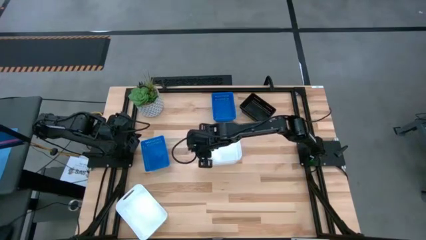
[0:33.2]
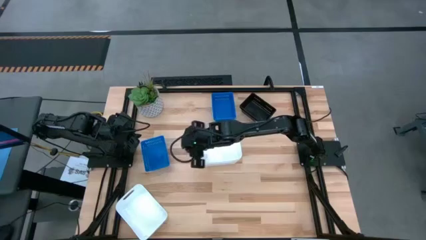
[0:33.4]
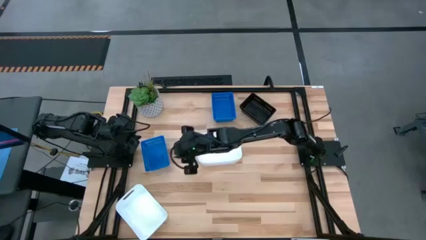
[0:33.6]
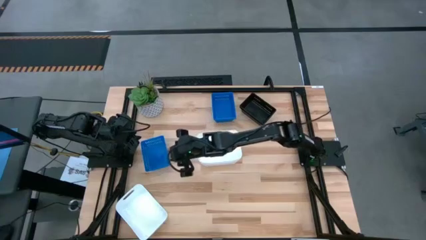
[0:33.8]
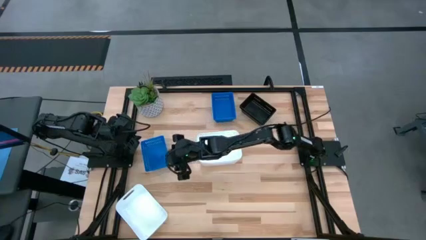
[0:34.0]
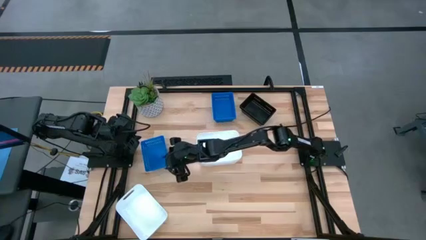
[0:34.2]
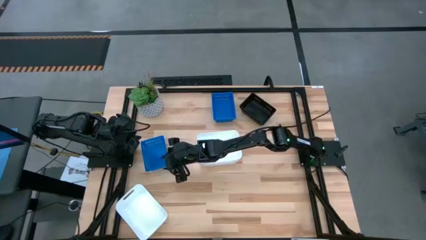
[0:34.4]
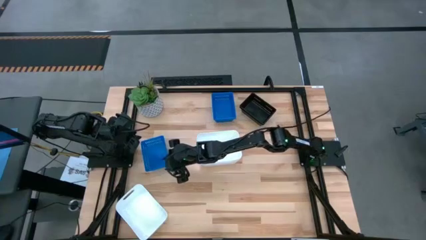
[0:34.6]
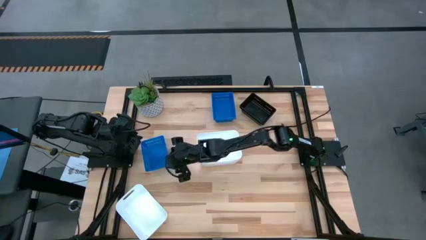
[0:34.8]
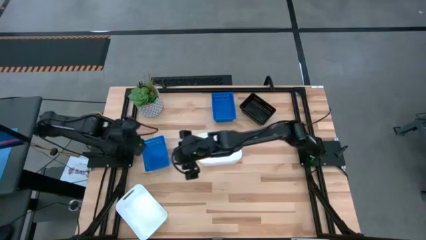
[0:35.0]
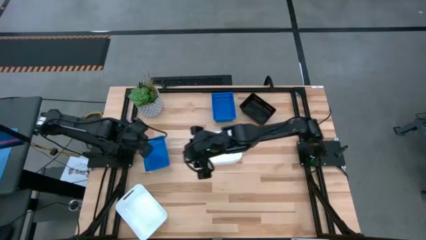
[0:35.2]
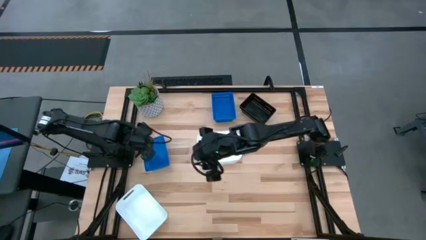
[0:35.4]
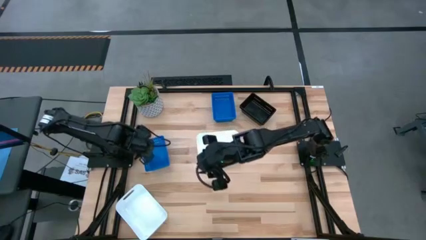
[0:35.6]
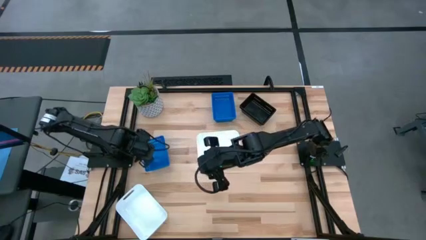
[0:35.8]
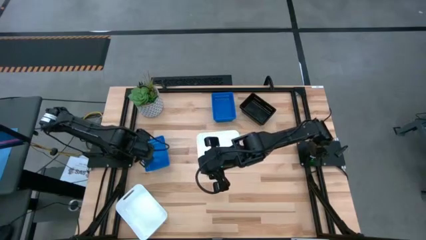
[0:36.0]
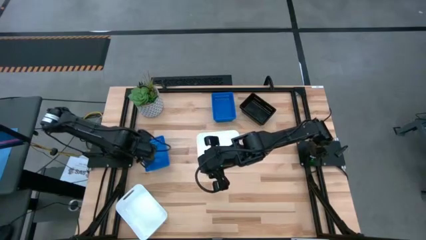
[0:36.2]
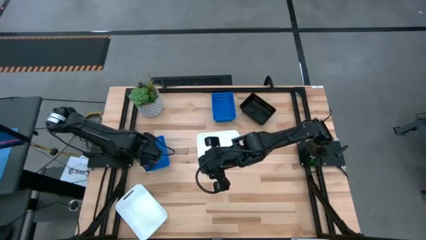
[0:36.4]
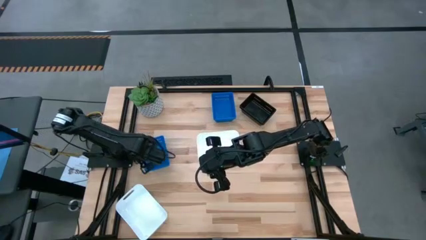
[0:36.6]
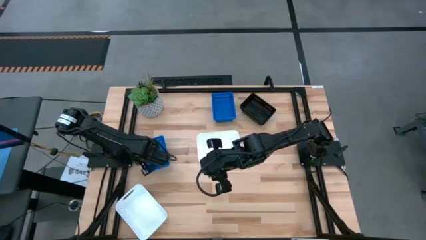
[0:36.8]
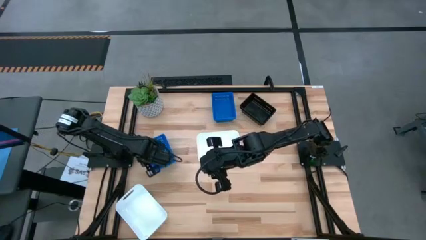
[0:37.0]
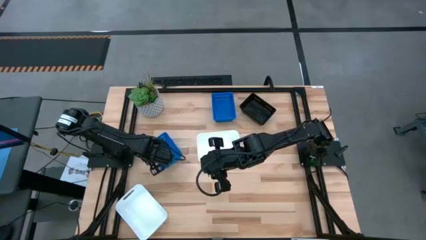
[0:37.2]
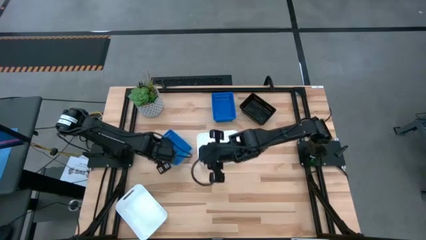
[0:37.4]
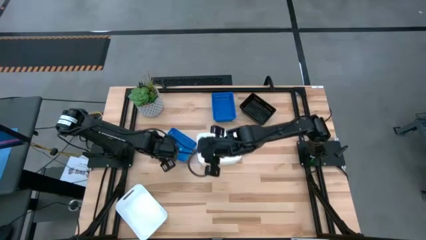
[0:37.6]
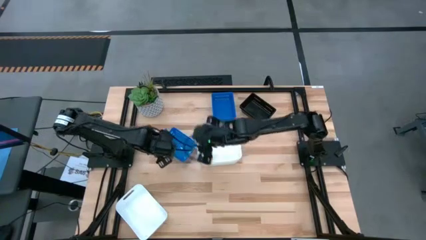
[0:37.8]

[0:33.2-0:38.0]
Move the blue bin toward the center of the table

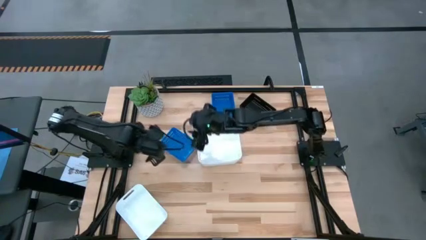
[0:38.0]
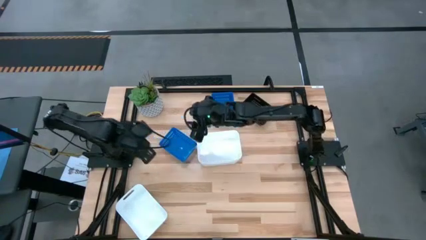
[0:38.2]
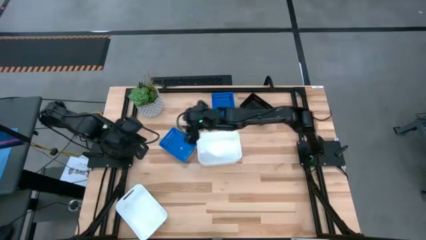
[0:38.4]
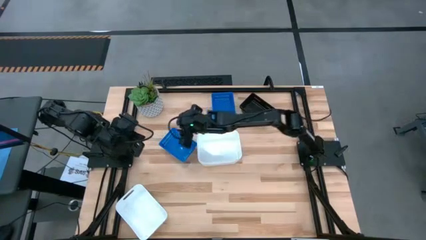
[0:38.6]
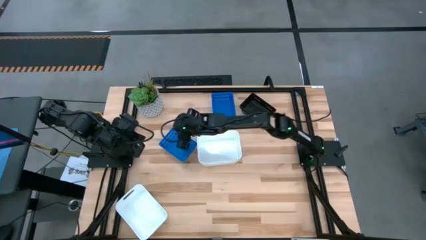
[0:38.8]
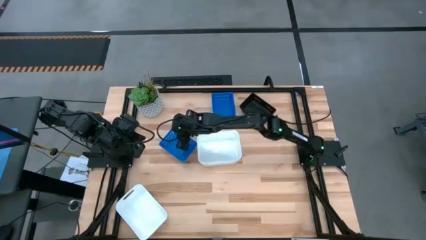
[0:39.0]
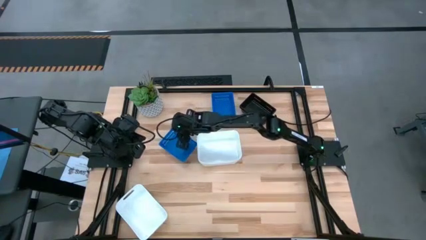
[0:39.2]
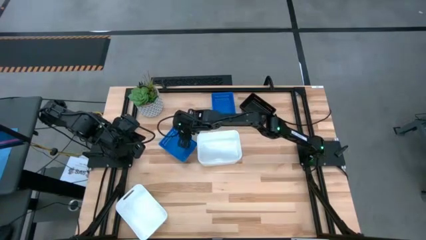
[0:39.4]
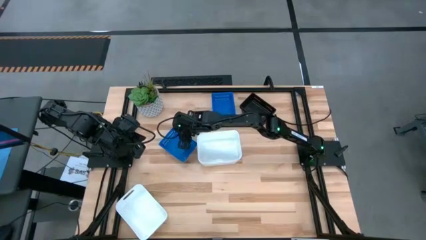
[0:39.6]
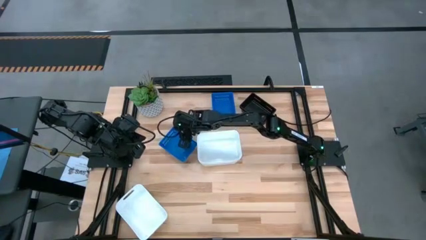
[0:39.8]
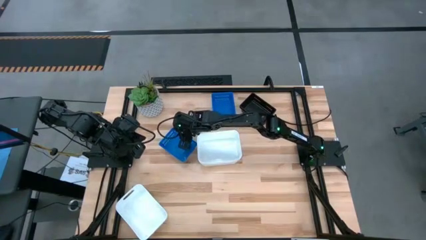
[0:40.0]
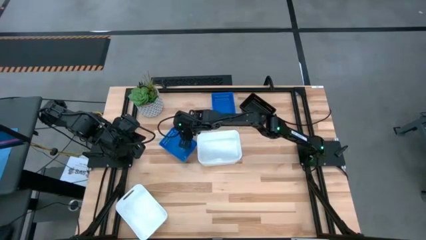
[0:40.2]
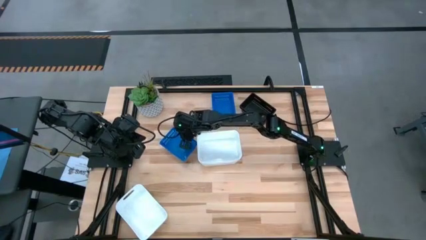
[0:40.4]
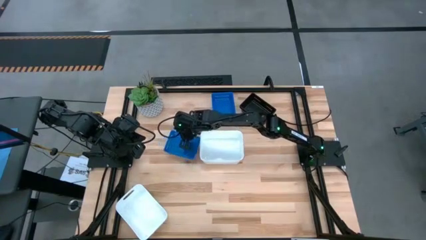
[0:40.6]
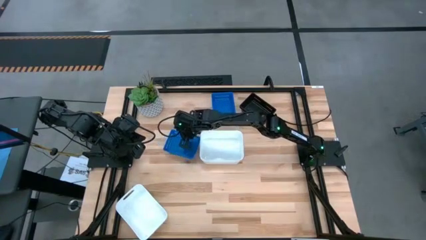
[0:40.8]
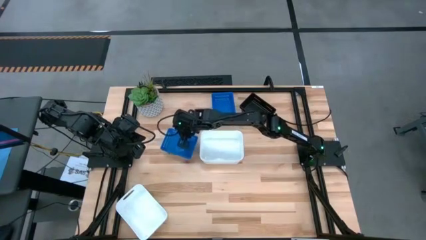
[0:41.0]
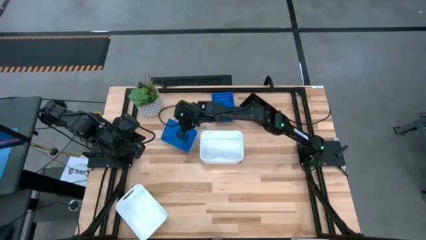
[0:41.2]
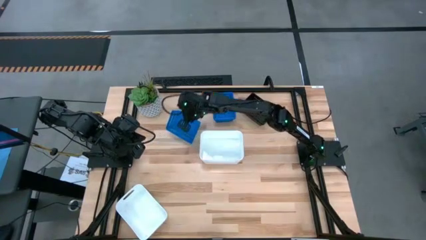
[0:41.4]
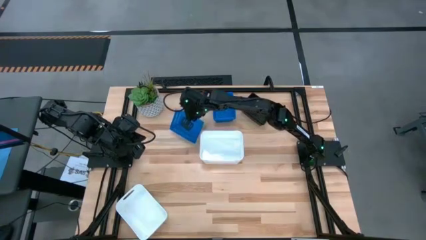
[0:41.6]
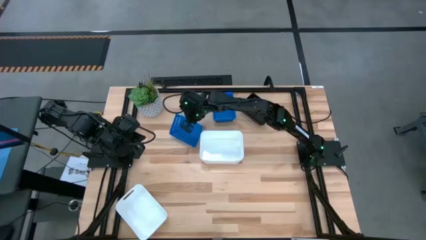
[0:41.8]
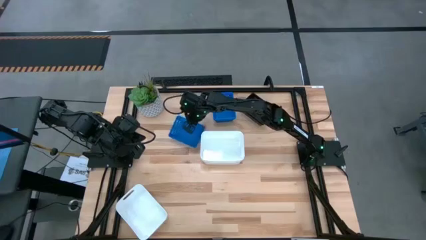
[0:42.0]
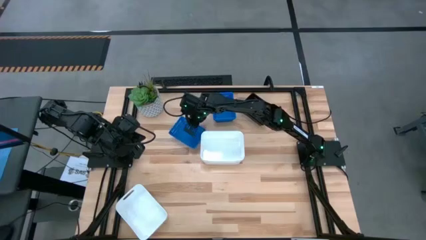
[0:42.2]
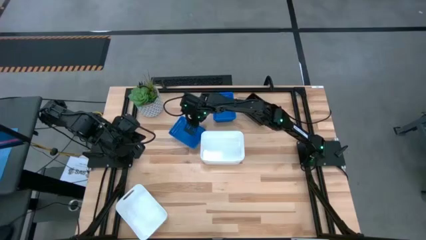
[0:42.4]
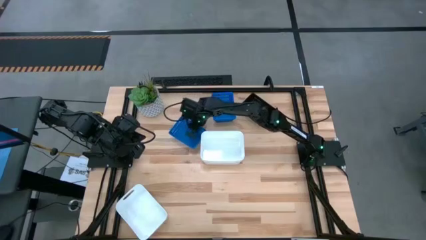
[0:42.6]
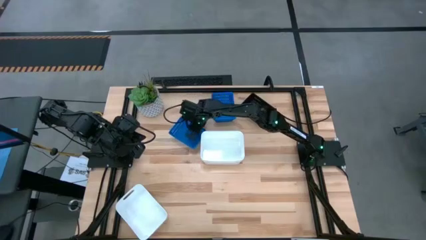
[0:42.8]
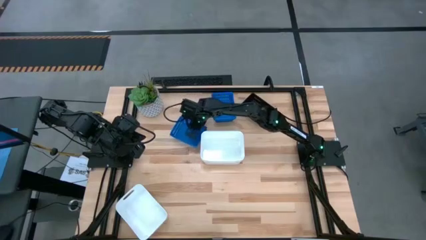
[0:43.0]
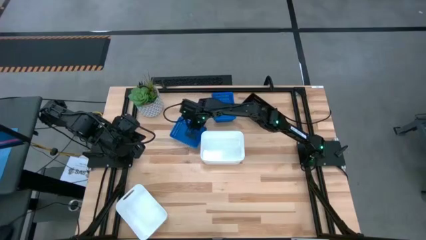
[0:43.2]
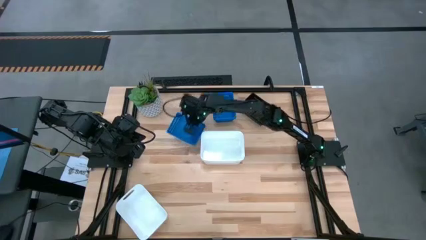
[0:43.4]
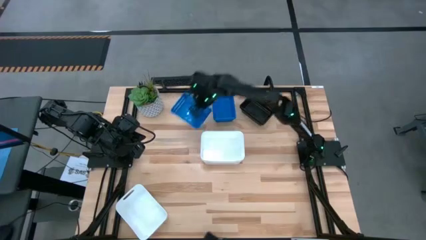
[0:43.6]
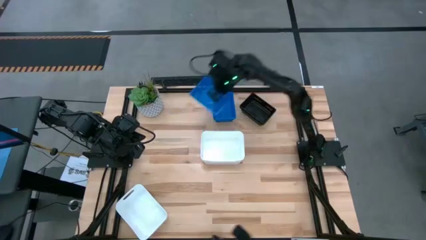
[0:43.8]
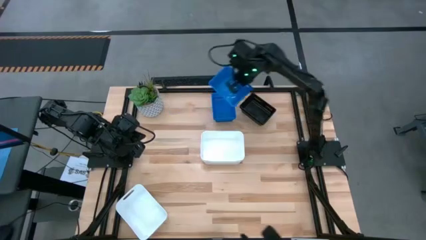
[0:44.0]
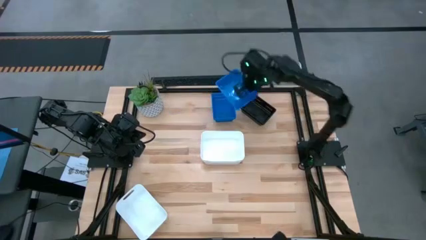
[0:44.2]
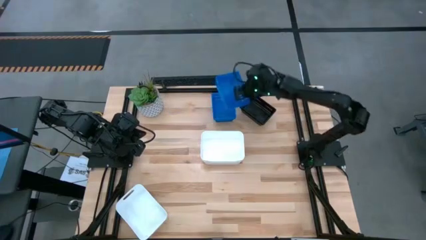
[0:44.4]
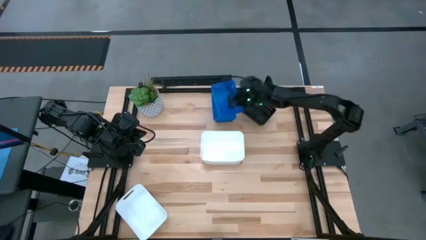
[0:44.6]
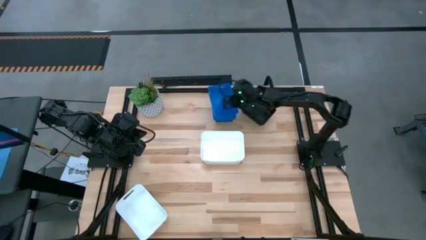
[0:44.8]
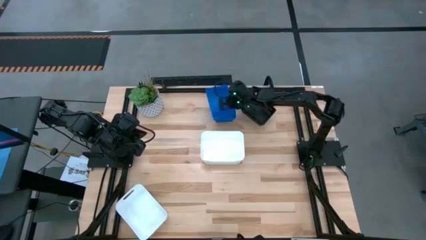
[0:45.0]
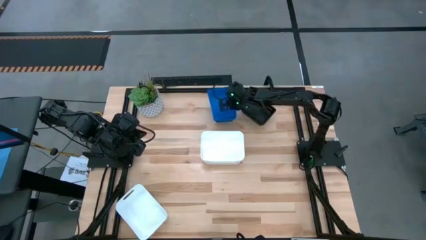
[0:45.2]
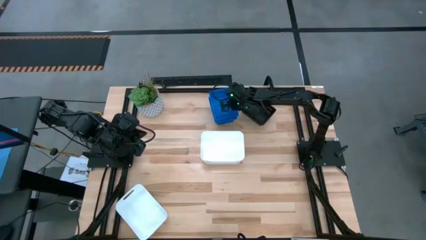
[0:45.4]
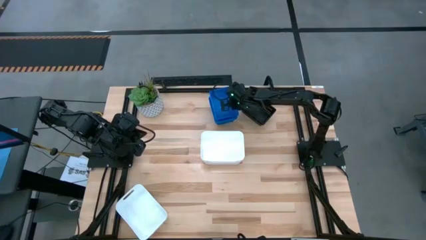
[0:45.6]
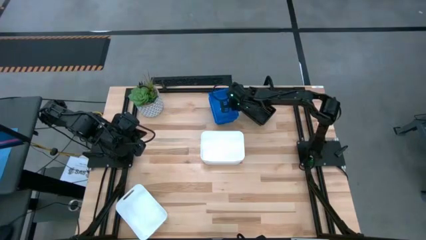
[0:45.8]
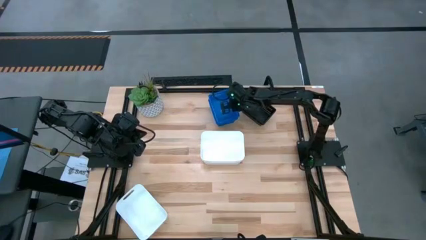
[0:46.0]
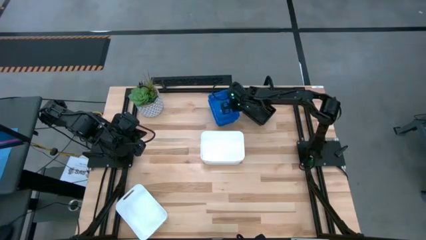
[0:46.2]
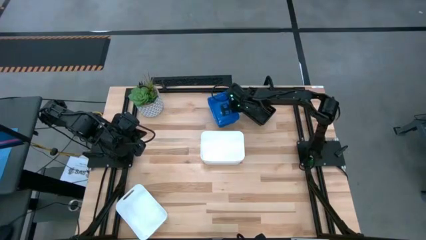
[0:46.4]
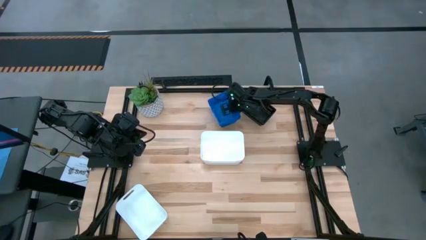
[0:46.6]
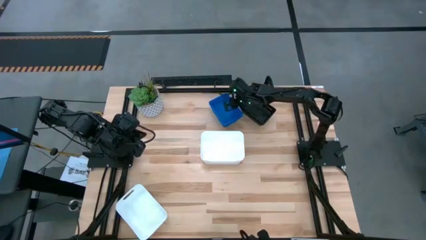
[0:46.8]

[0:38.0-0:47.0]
Stack the blue bin on top of the stacked blue bins
